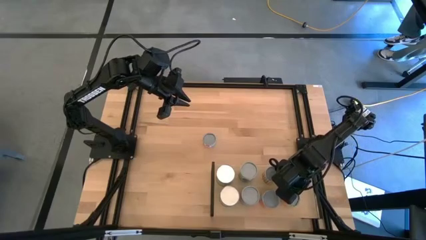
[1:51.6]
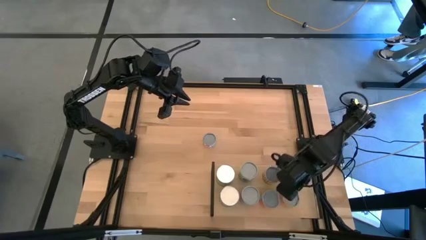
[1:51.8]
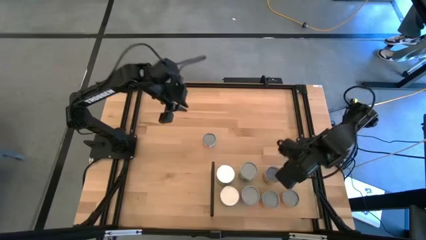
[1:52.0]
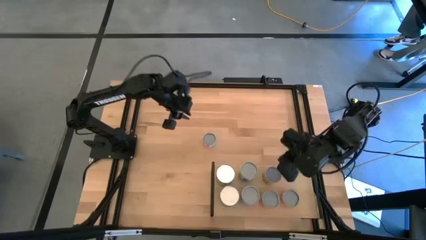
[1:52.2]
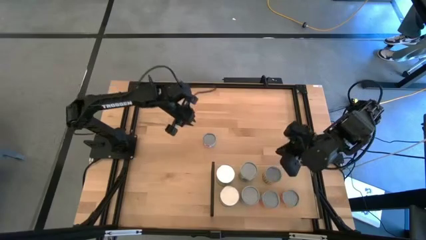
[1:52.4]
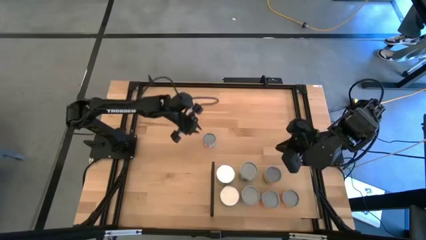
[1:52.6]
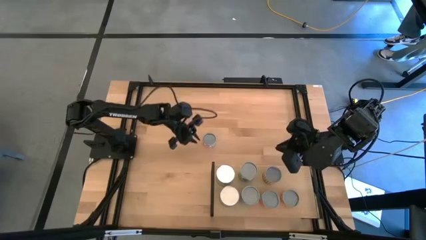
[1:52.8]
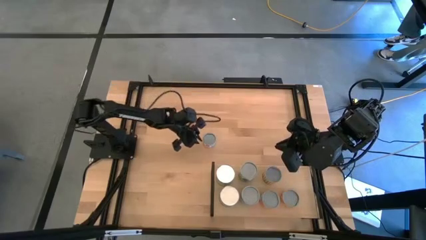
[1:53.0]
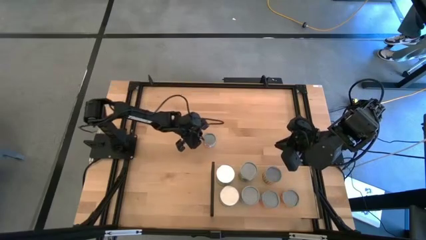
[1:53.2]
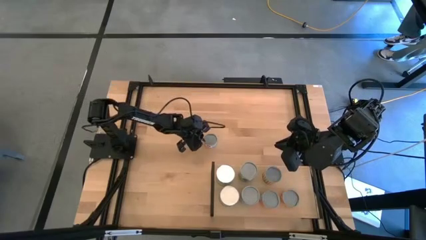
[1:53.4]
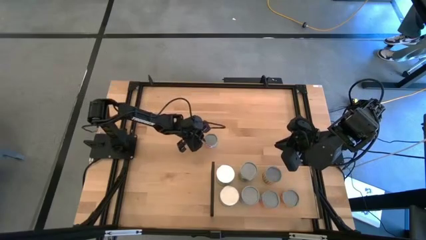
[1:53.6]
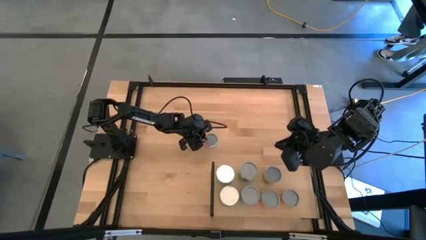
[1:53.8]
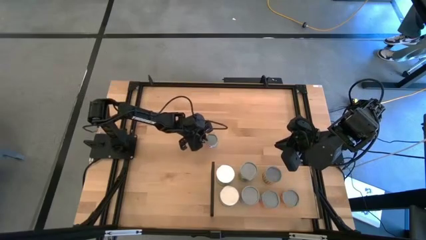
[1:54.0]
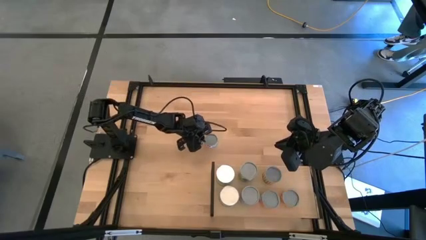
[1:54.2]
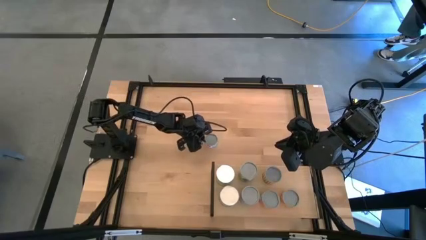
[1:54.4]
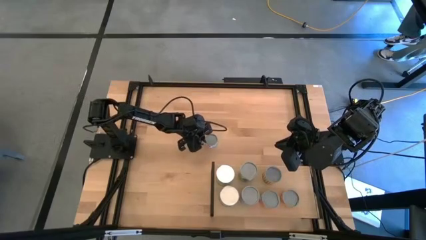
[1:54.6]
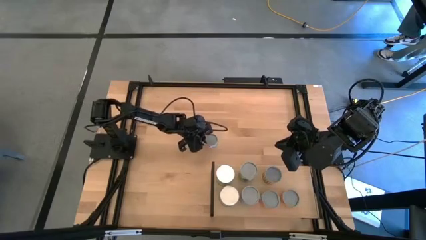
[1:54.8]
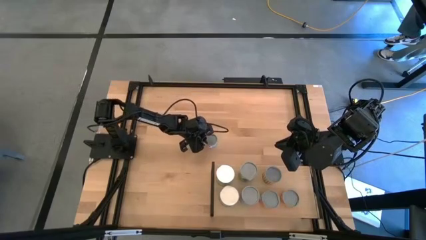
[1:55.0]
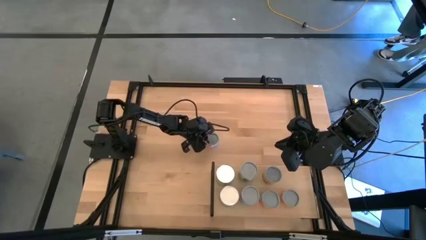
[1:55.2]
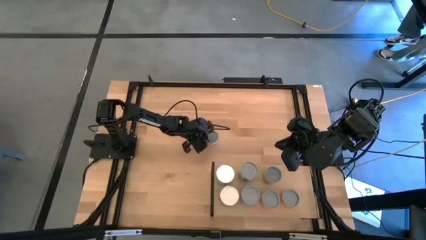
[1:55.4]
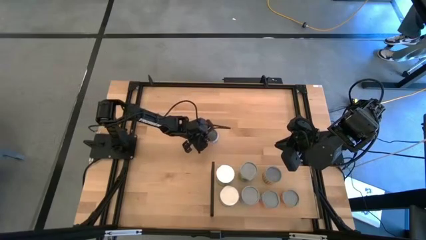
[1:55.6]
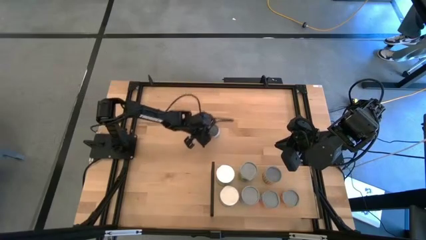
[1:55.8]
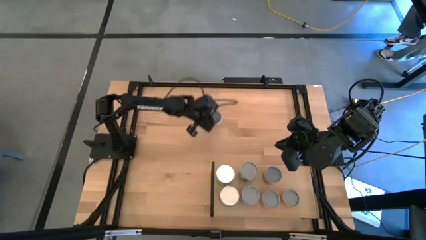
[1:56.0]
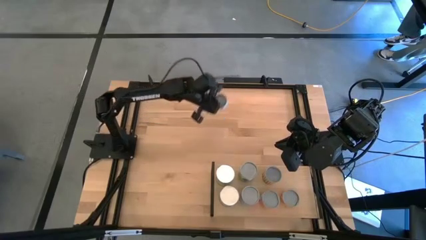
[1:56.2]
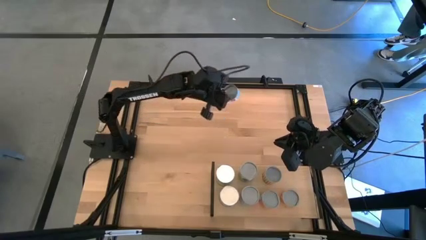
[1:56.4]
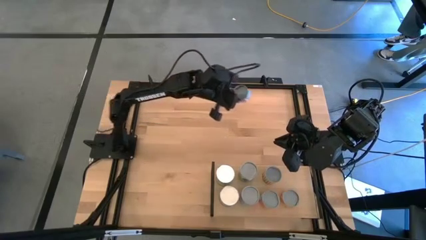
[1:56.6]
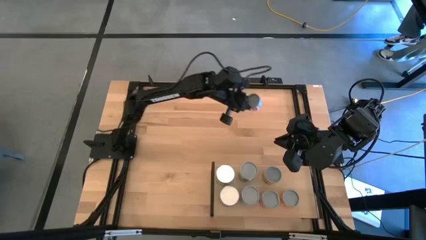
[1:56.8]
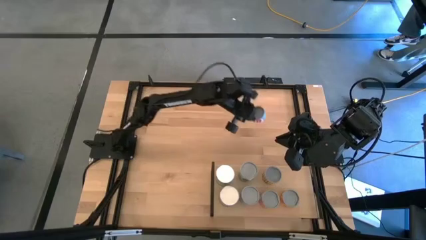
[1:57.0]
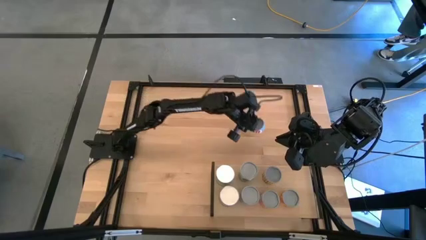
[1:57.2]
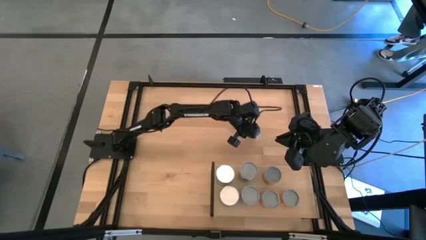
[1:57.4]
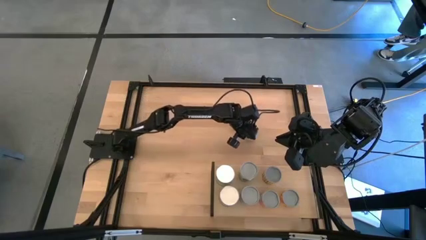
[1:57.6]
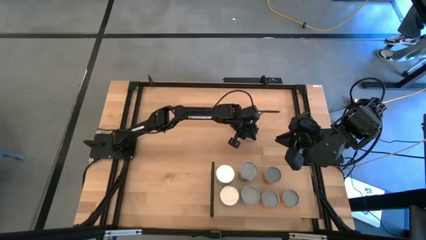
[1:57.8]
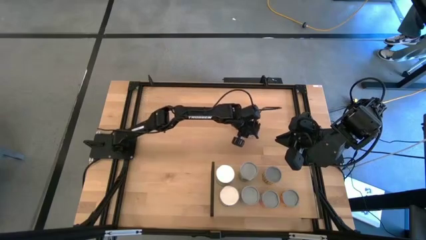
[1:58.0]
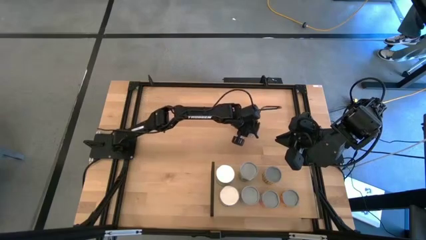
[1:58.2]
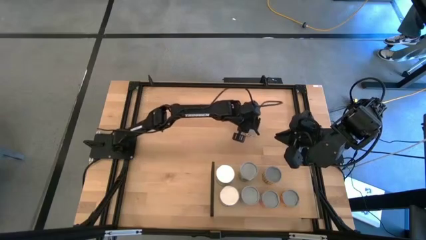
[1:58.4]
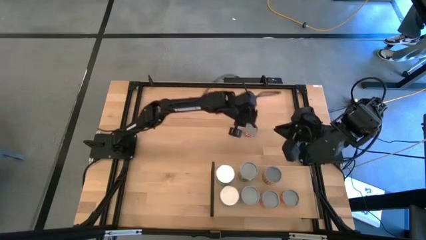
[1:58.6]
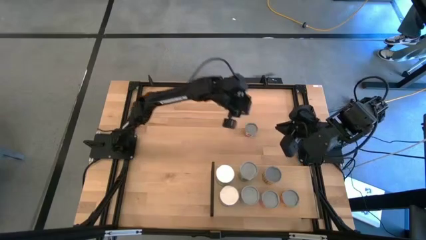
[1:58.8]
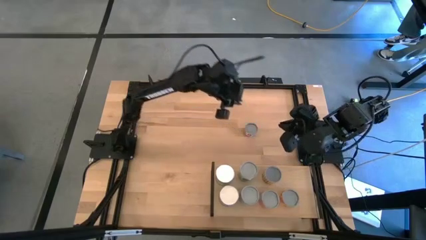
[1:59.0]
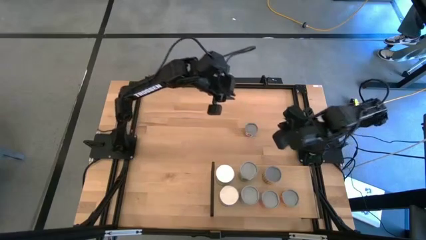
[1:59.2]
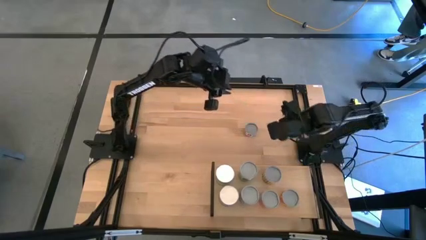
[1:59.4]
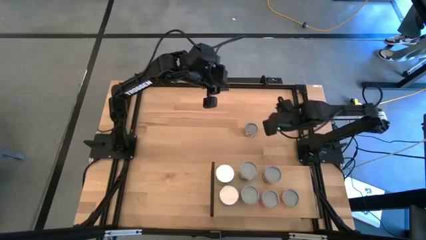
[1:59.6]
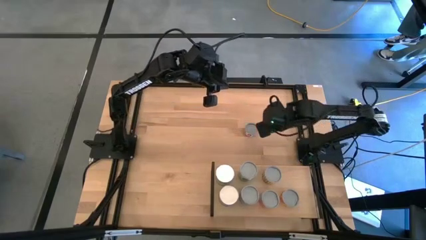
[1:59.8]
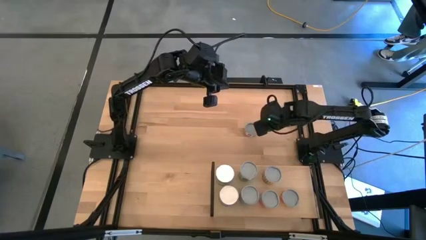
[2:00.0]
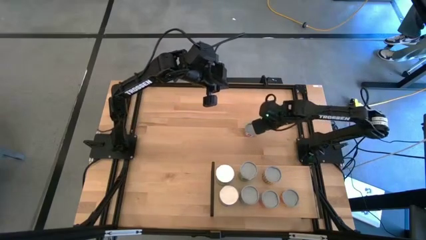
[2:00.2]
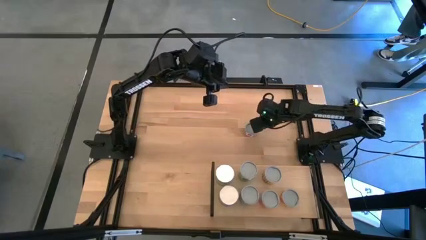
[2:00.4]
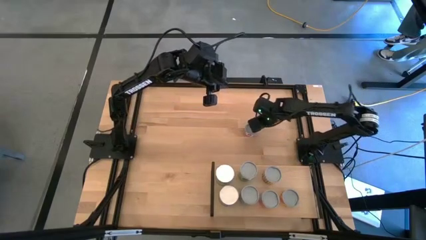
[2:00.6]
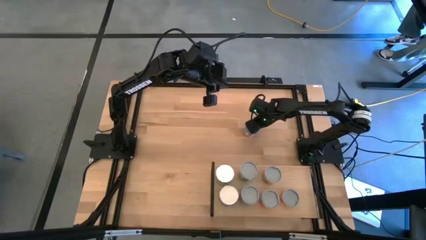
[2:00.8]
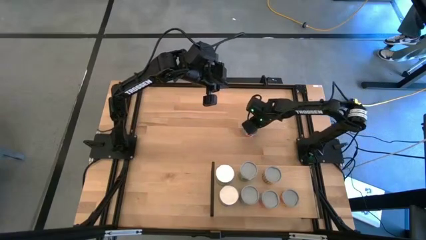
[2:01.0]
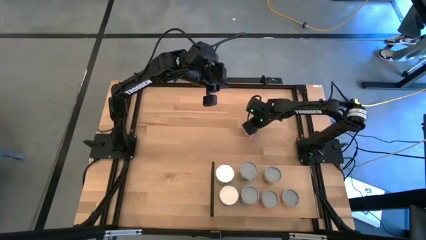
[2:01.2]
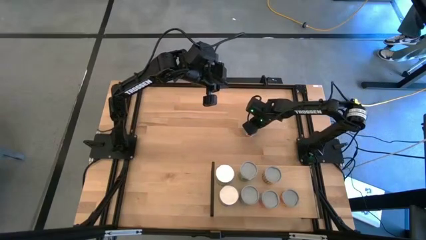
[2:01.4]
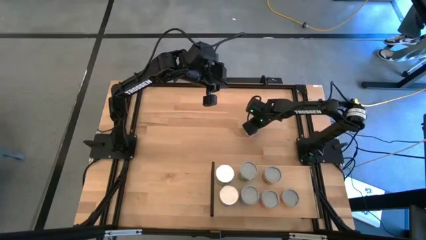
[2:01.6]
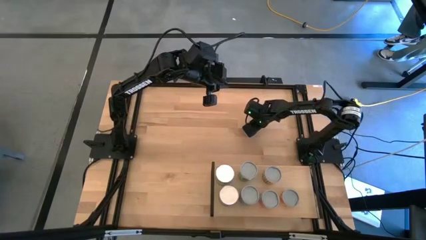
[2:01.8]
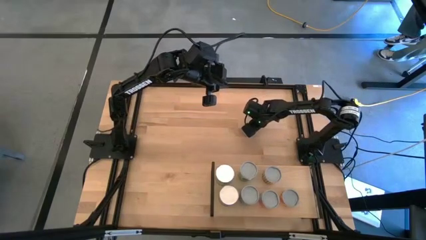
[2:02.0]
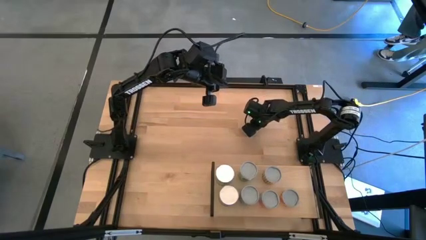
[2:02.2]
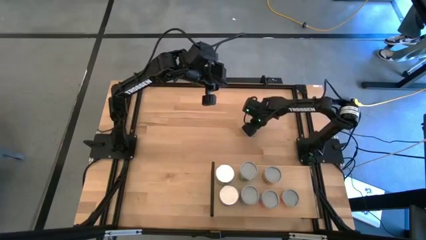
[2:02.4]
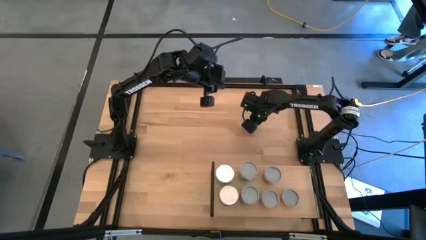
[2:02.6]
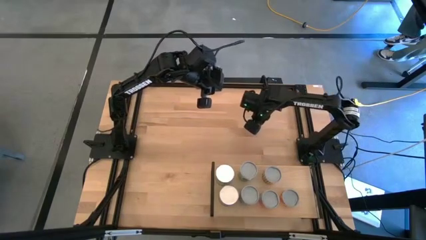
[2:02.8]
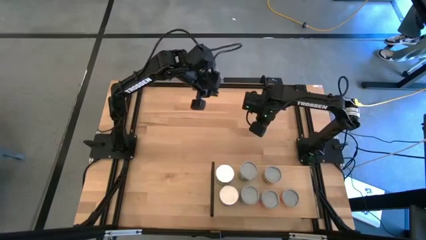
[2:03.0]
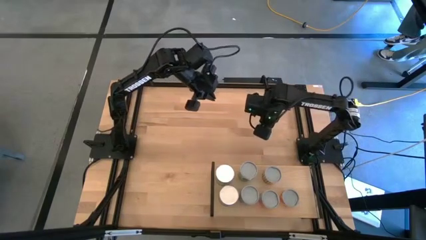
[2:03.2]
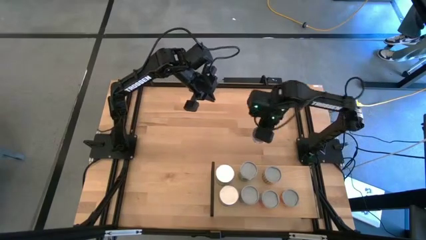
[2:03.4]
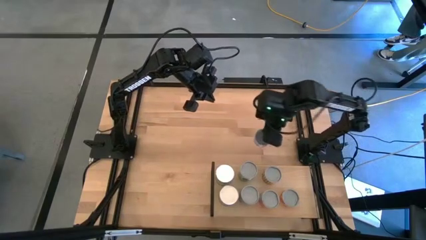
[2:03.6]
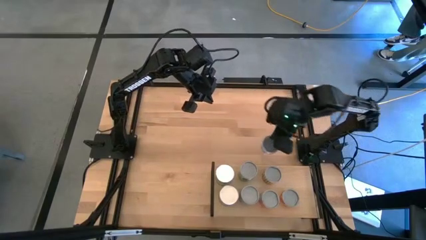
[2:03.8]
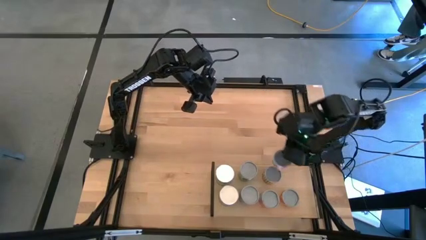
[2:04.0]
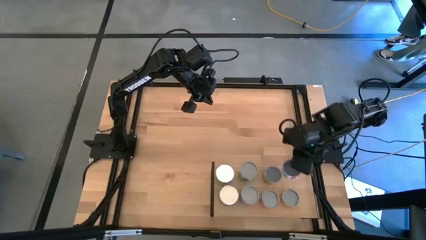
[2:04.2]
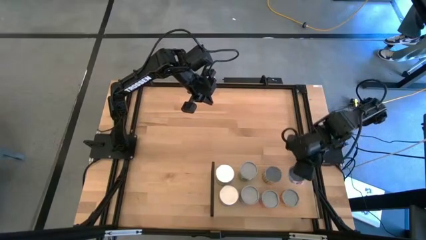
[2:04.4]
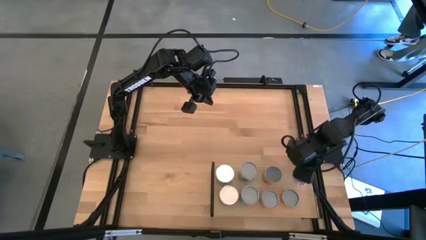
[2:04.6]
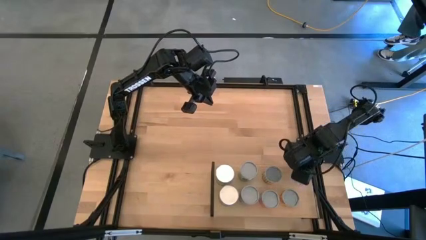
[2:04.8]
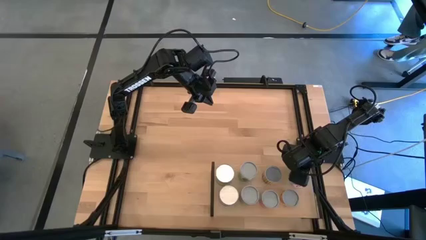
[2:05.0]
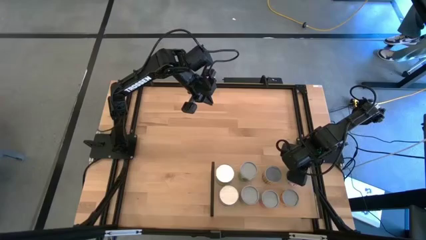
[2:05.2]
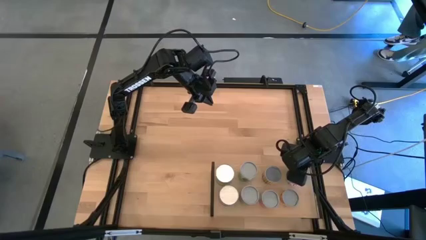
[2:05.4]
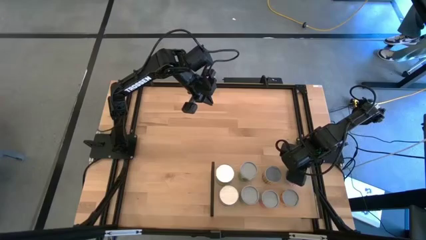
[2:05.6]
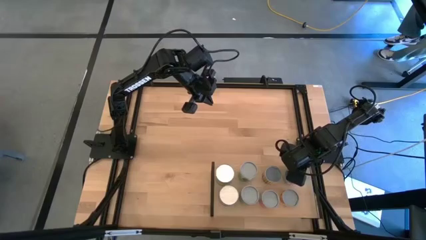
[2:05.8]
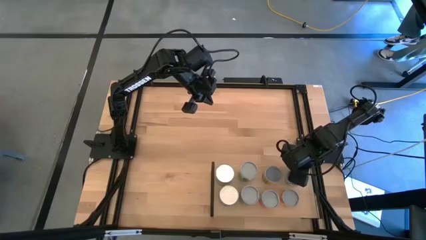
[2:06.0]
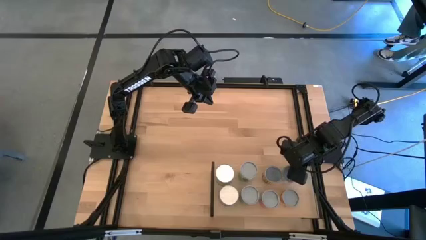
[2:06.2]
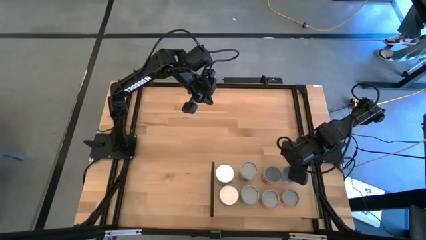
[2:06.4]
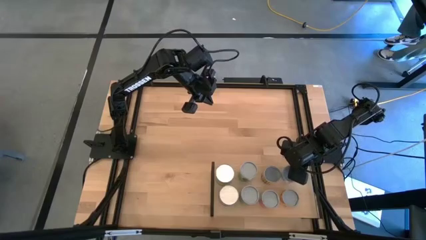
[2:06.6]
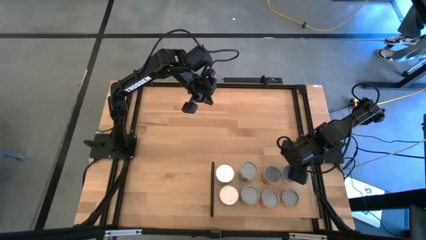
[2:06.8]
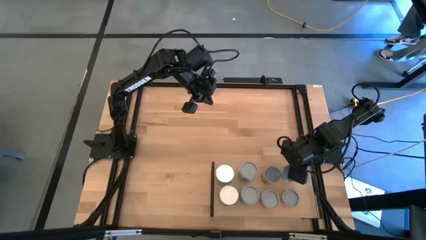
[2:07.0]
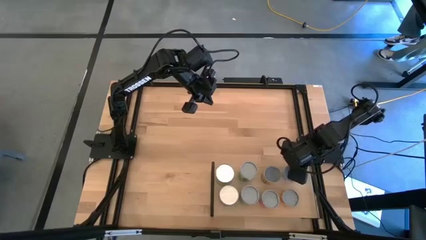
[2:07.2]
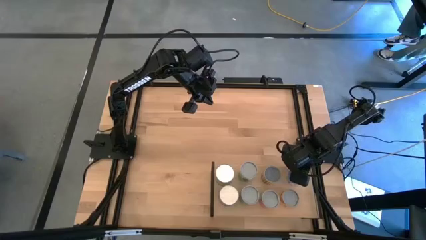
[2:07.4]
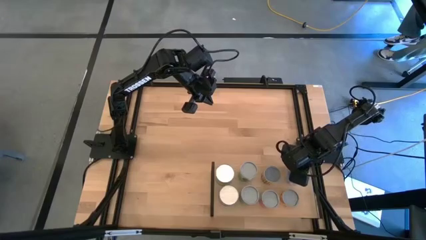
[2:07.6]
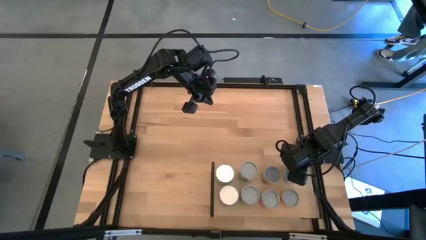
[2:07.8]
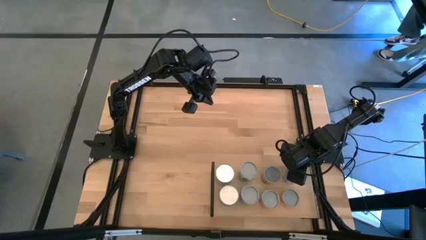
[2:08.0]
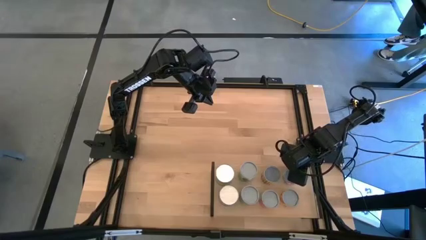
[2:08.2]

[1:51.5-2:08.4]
Task: Pick and place cans onto a shelf
Put the tuna can on the shelf
